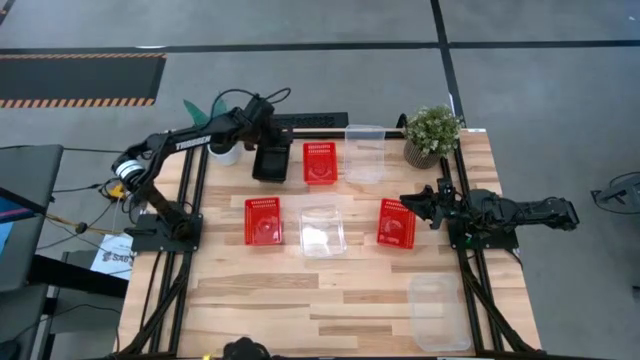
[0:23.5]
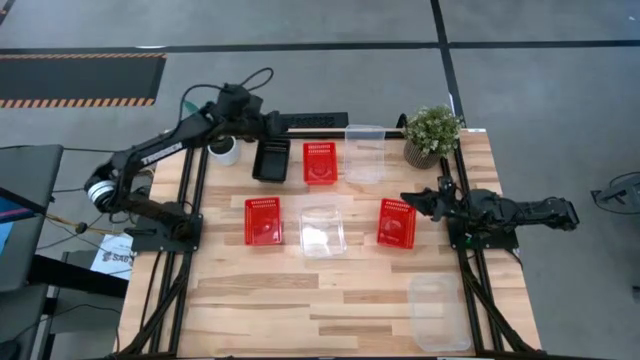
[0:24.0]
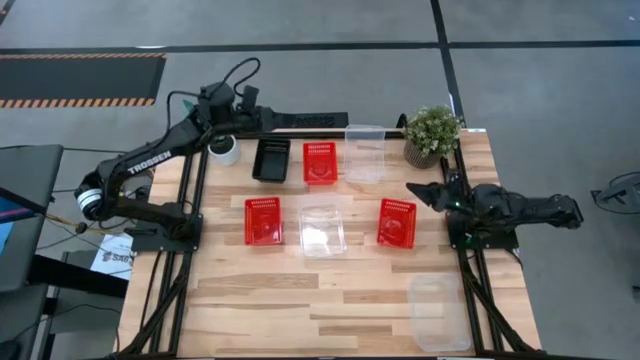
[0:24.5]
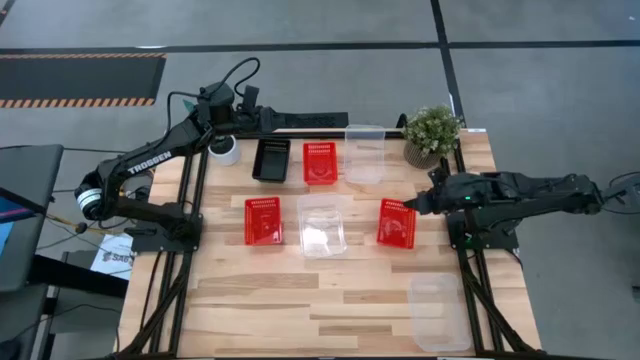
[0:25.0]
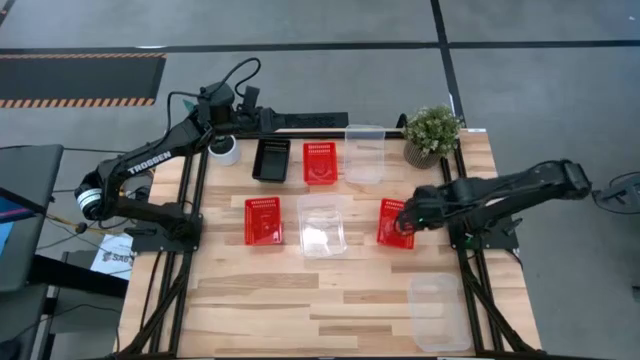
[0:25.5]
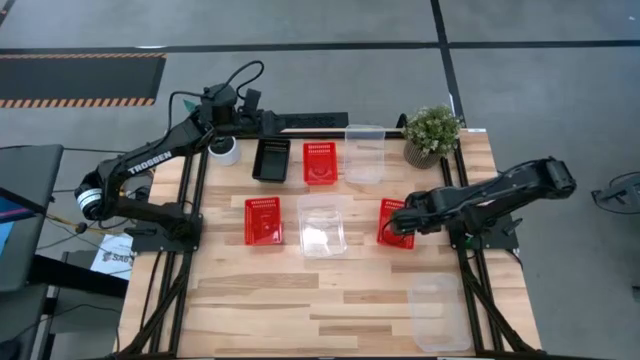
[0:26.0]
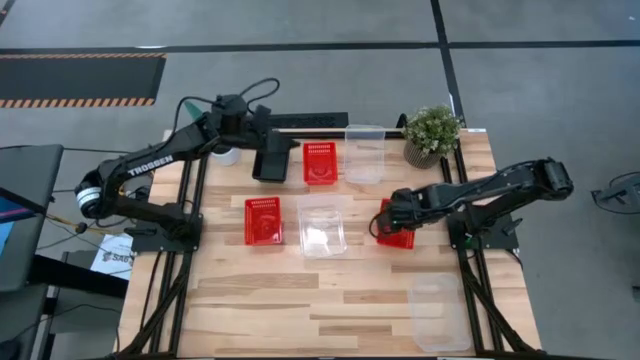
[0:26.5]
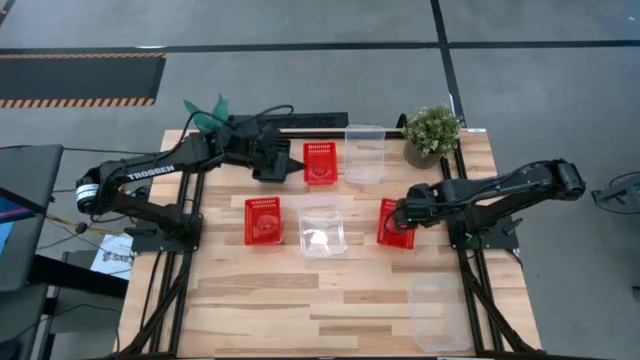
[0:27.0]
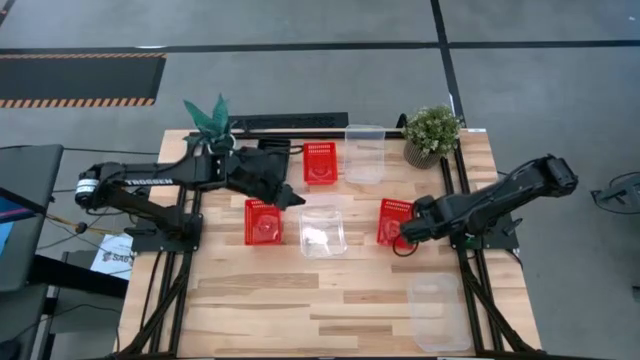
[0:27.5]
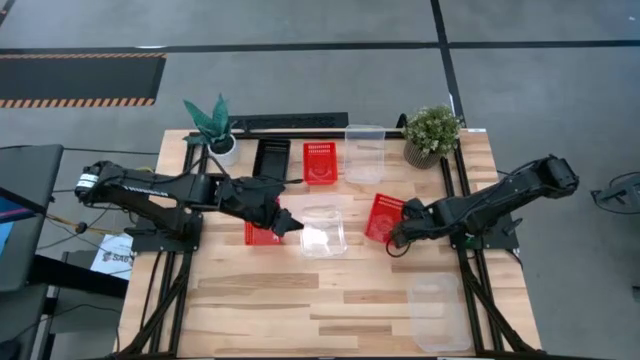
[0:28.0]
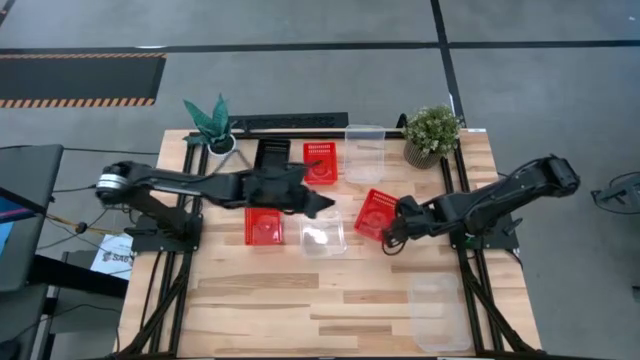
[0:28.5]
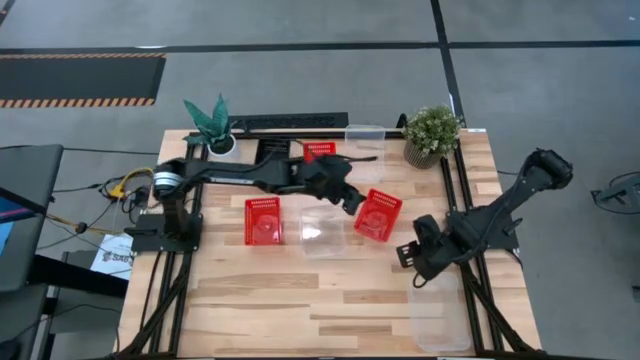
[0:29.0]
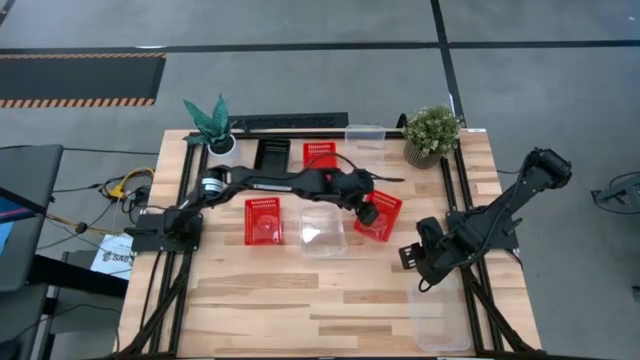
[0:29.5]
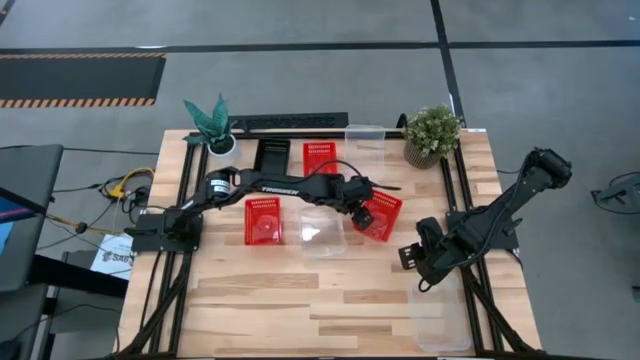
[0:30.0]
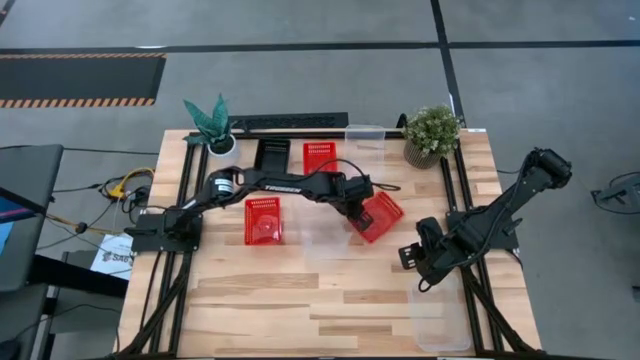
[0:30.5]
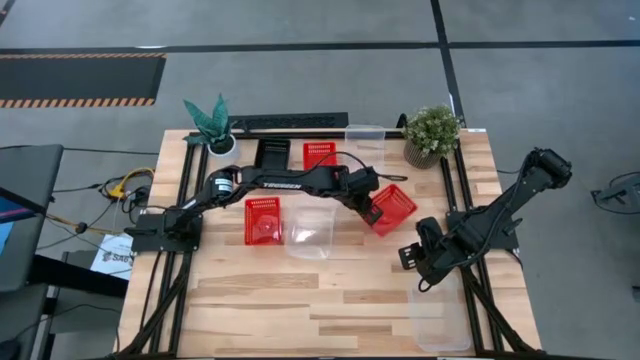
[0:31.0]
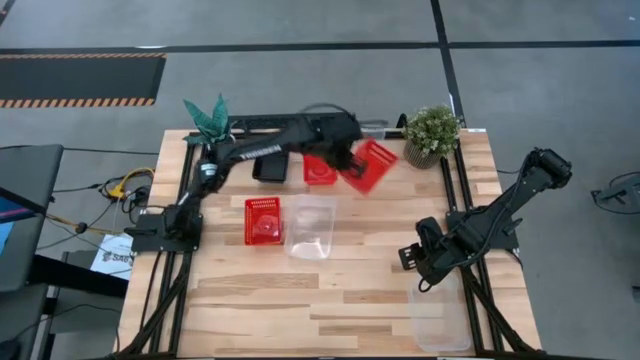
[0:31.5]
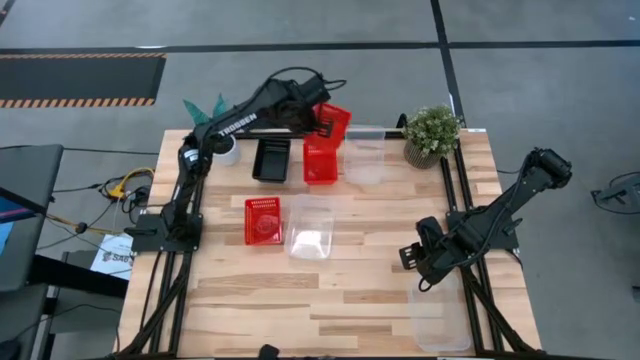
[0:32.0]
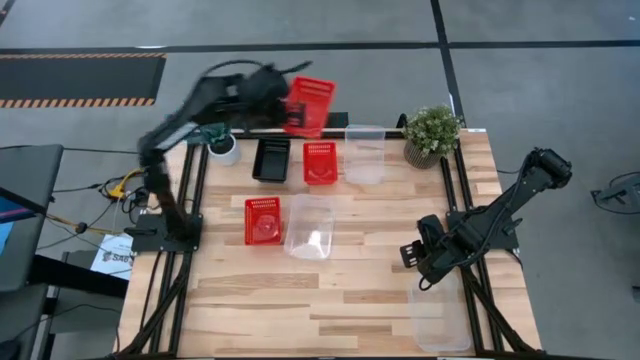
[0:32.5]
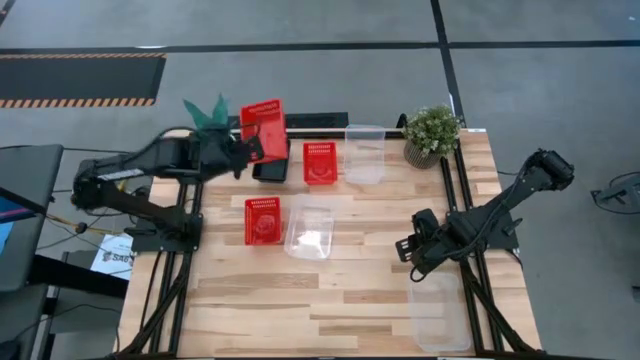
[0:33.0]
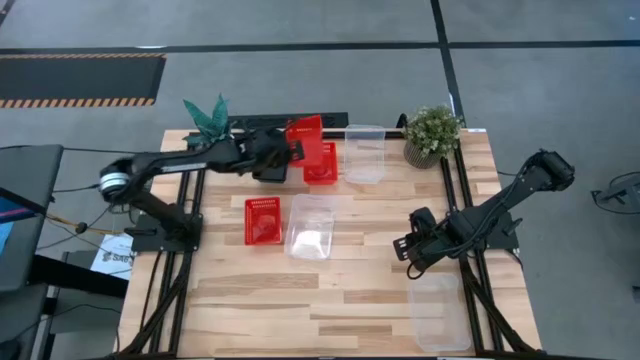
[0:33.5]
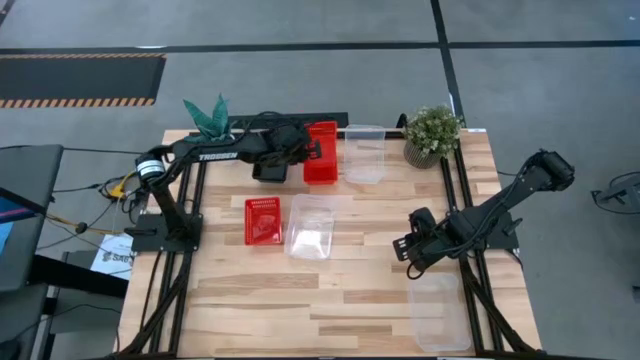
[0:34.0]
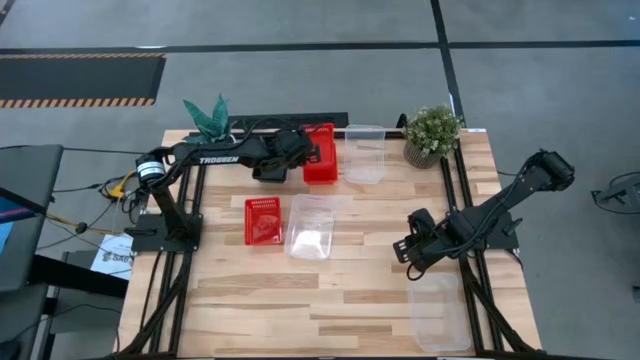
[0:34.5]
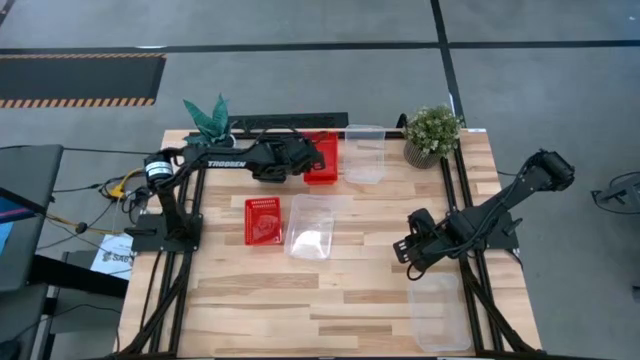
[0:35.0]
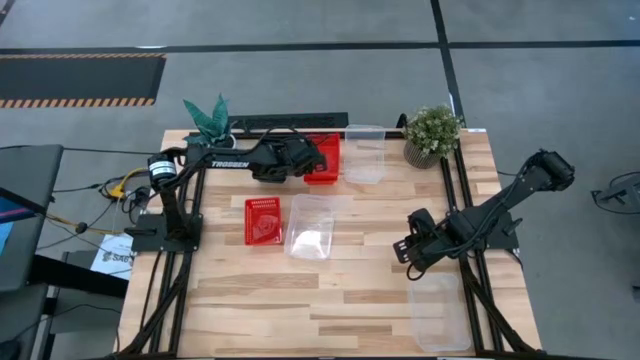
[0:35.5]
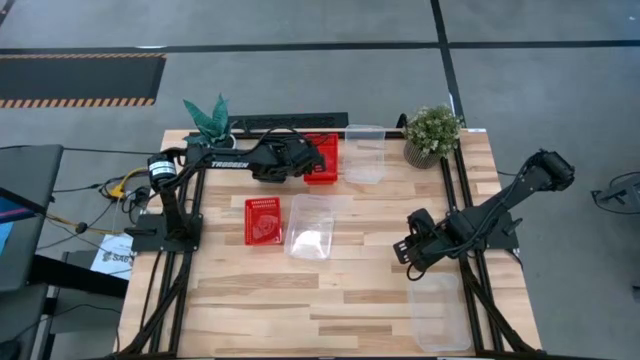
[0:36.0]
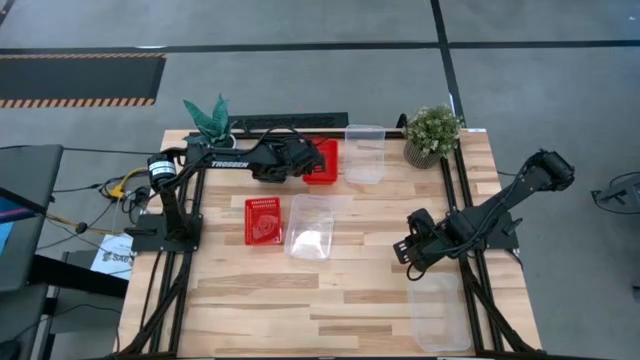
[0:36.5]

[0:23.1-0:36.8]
Stack the right bin on the top red bin

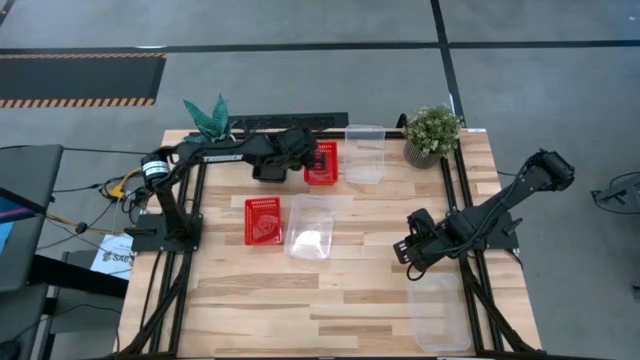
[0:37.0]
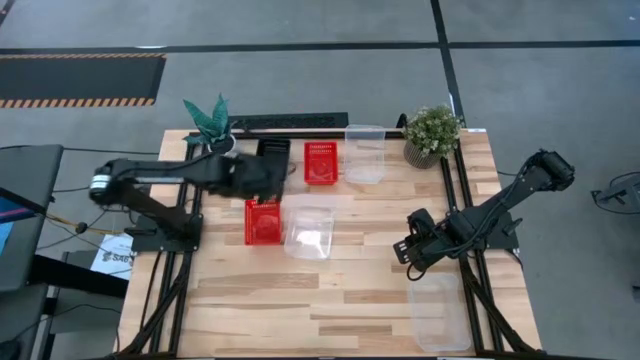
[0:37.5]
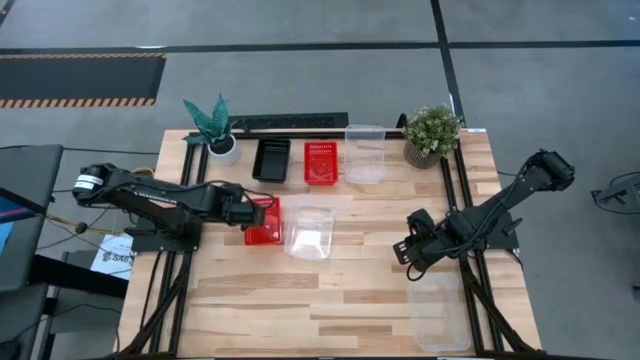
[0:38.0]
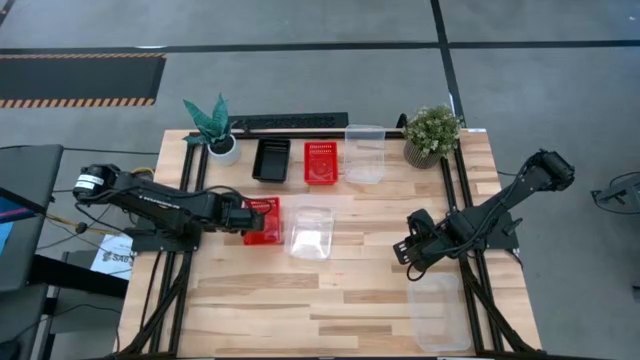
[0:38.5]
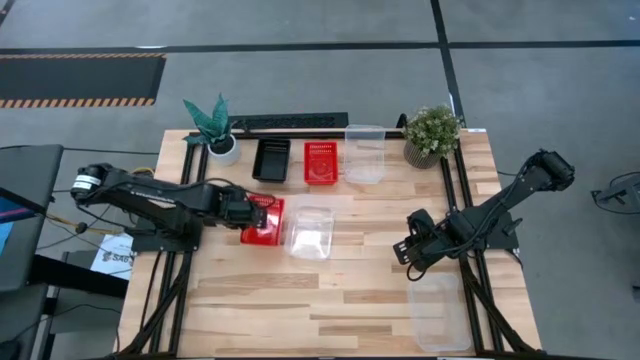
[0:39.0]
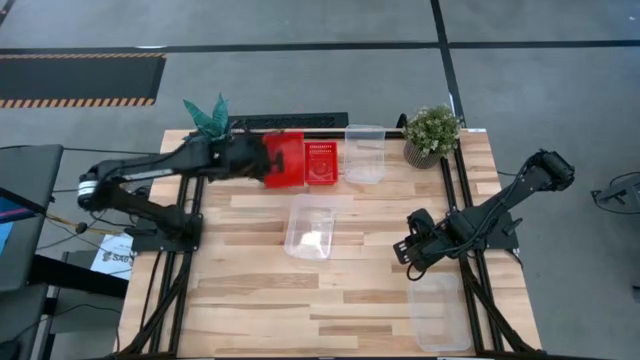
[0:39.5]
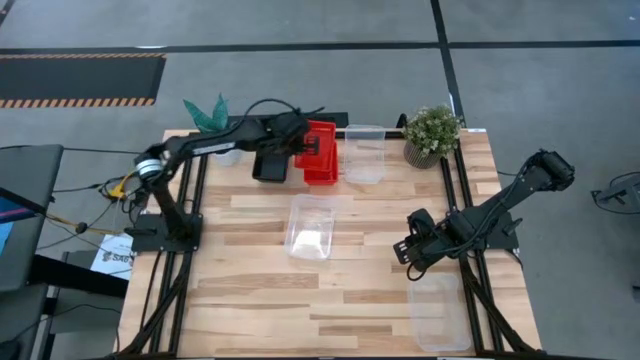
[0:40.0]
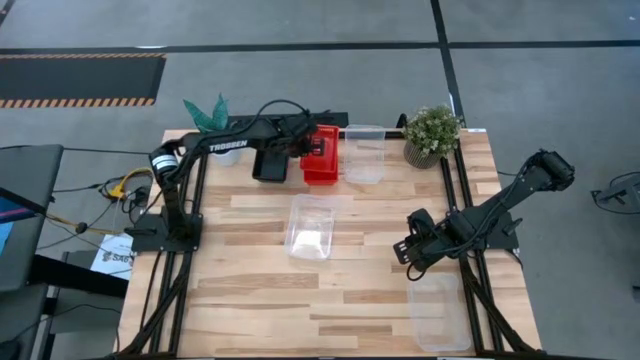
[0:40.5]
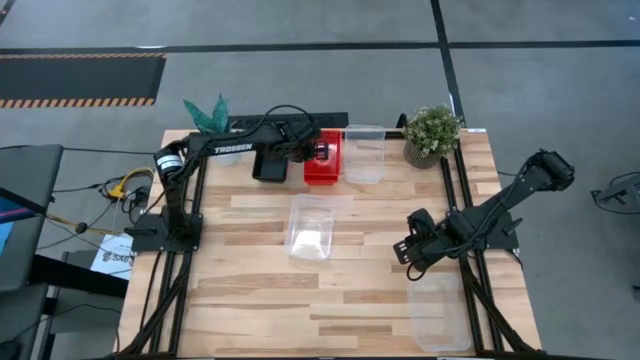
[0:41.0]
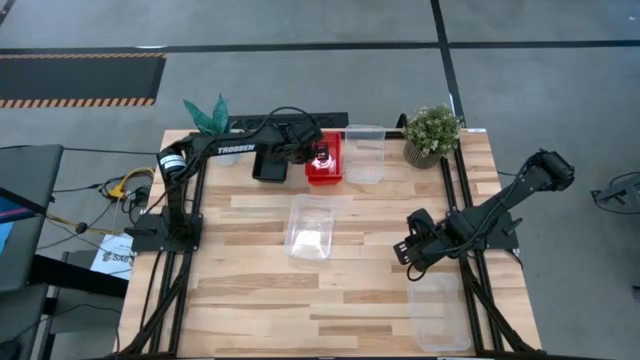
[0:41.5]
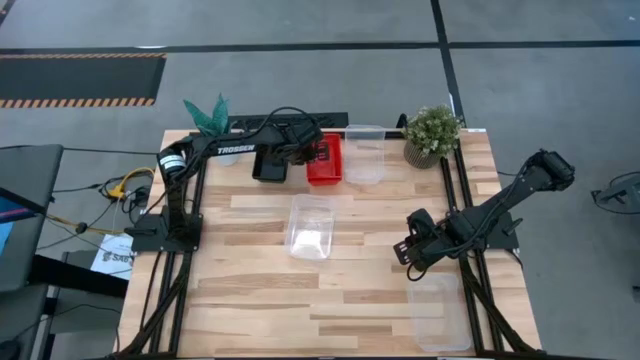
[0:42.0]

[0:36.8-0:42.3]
Stack the red bin on the red bin
